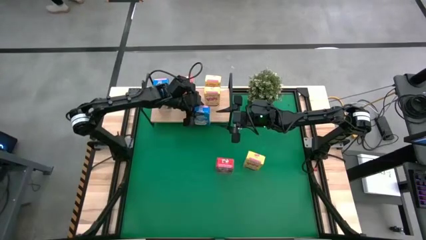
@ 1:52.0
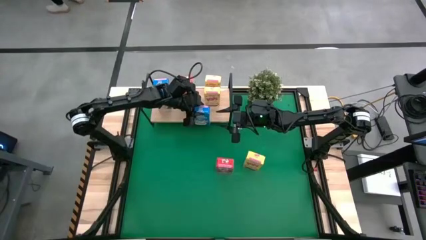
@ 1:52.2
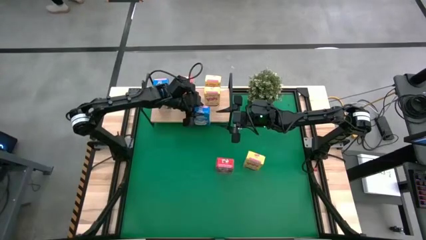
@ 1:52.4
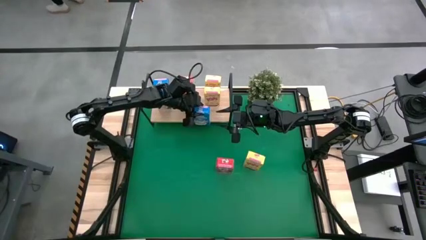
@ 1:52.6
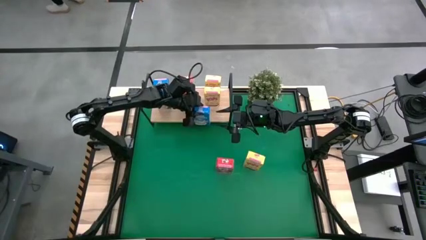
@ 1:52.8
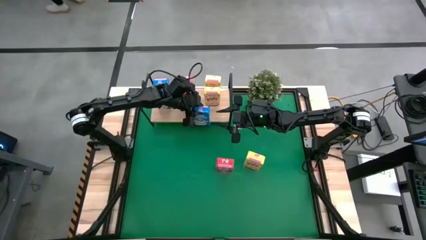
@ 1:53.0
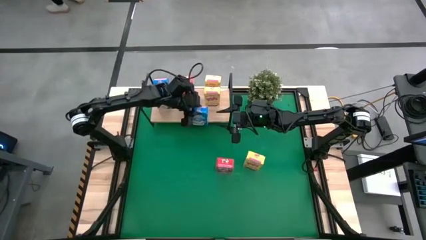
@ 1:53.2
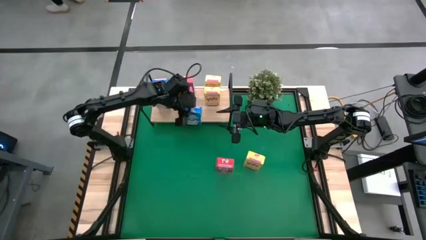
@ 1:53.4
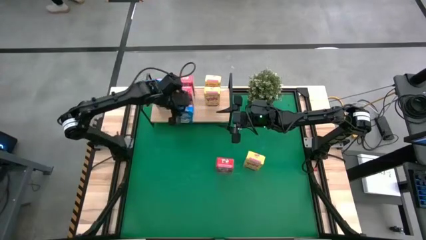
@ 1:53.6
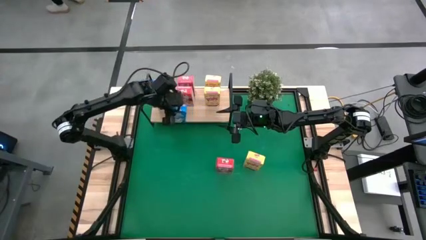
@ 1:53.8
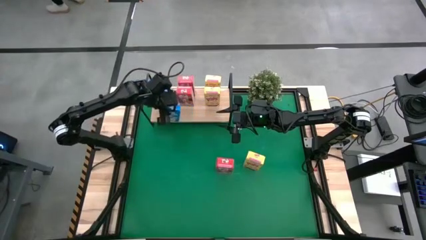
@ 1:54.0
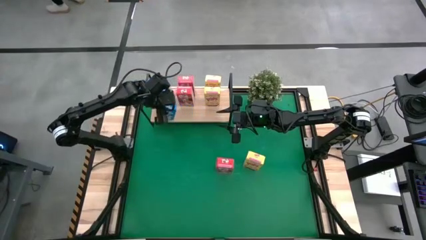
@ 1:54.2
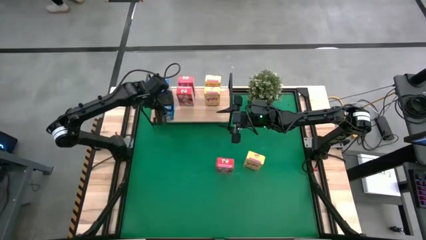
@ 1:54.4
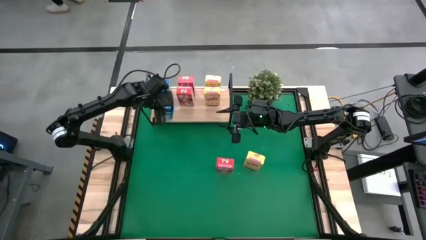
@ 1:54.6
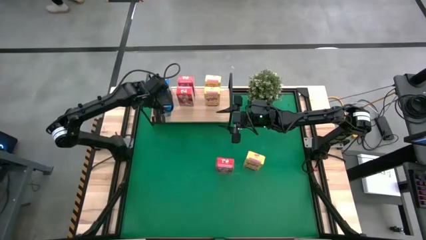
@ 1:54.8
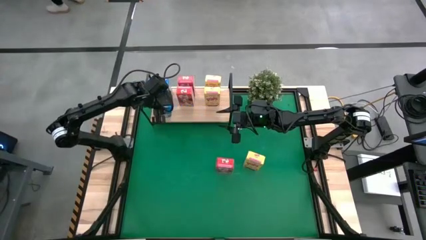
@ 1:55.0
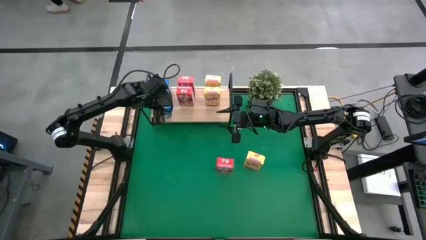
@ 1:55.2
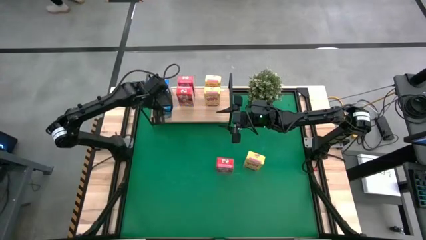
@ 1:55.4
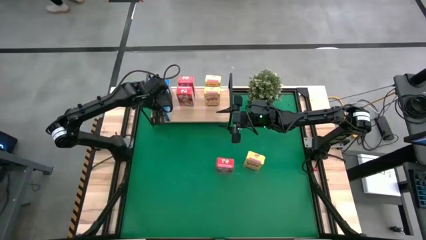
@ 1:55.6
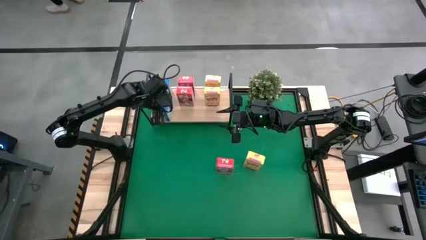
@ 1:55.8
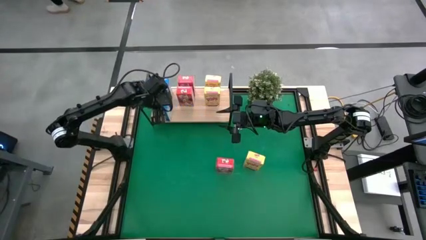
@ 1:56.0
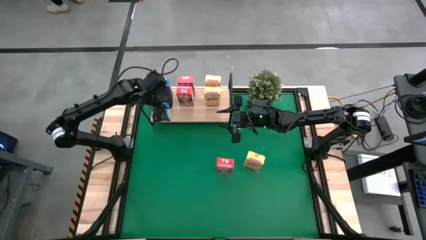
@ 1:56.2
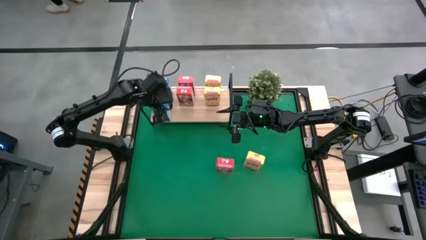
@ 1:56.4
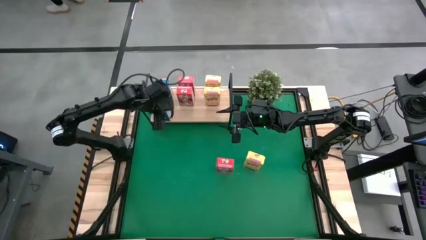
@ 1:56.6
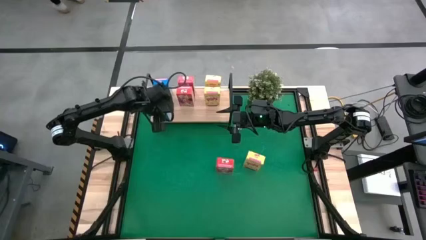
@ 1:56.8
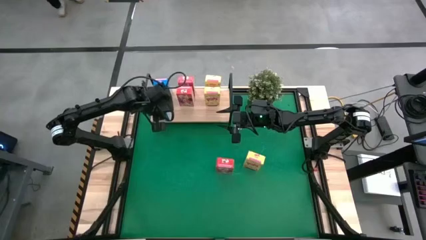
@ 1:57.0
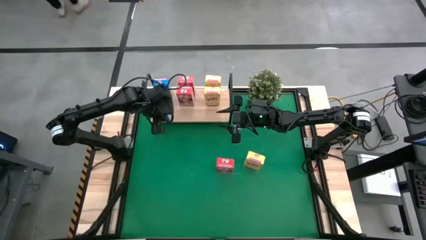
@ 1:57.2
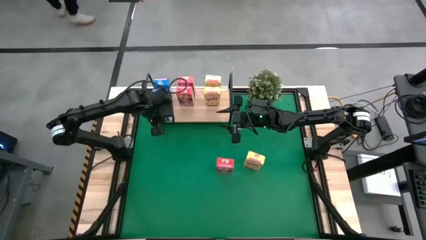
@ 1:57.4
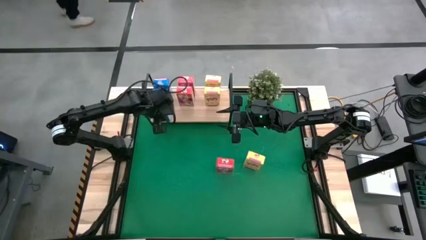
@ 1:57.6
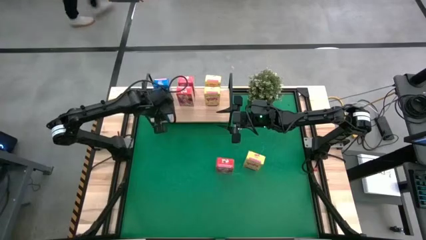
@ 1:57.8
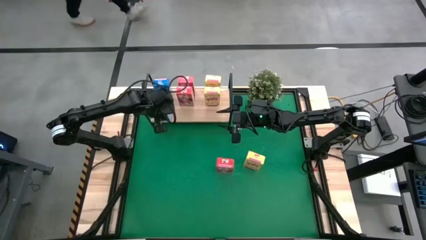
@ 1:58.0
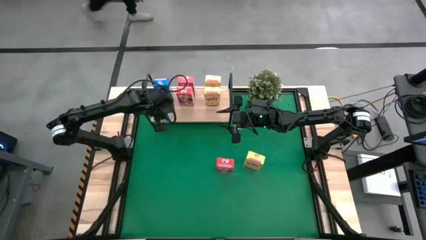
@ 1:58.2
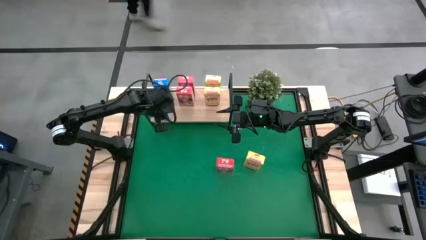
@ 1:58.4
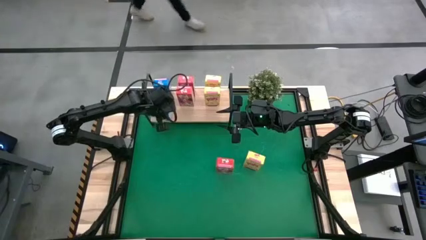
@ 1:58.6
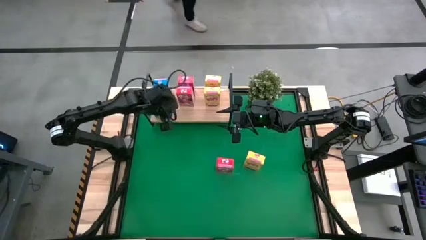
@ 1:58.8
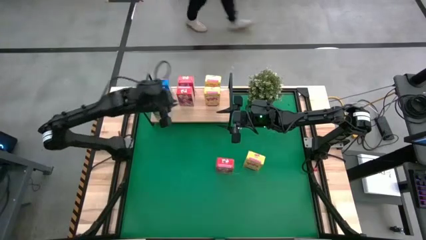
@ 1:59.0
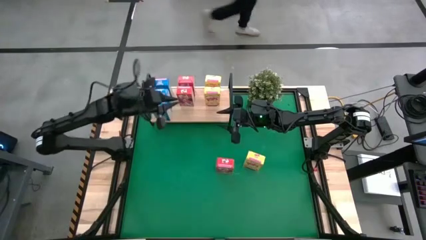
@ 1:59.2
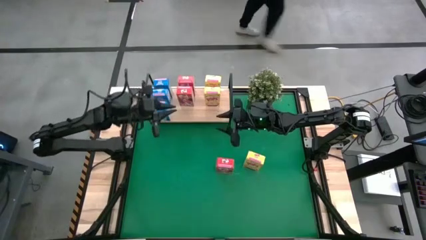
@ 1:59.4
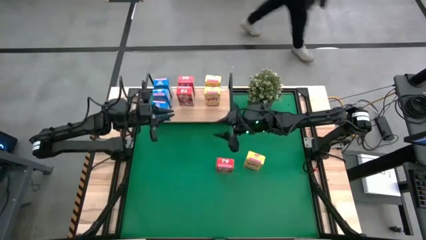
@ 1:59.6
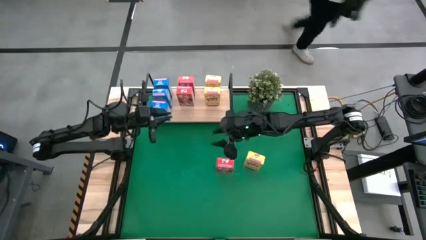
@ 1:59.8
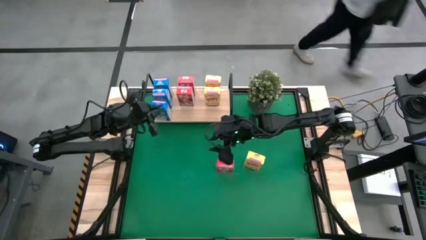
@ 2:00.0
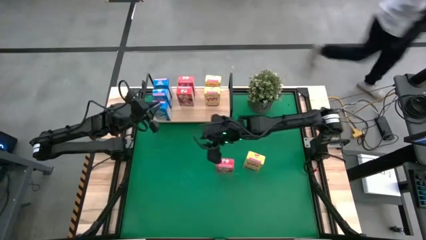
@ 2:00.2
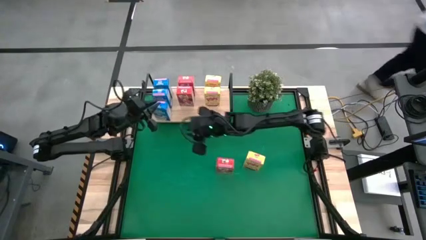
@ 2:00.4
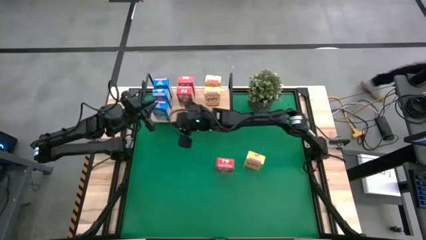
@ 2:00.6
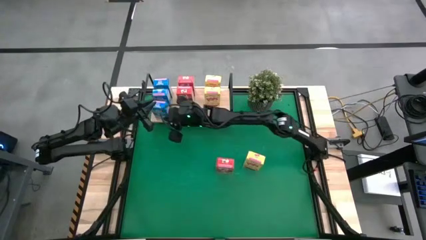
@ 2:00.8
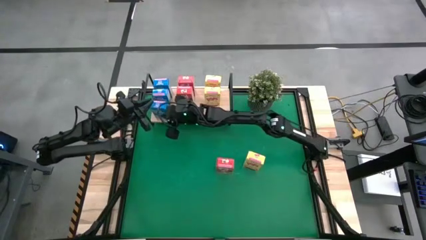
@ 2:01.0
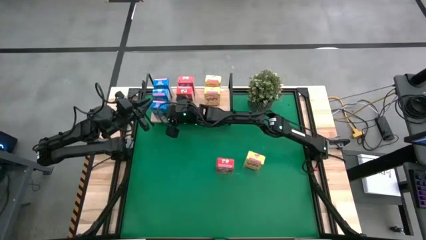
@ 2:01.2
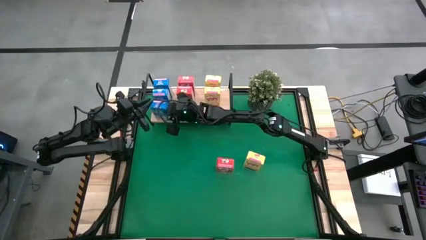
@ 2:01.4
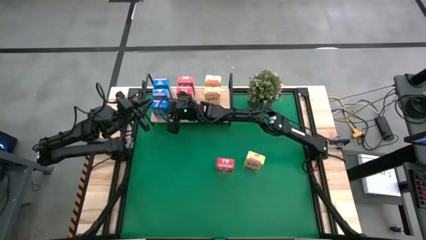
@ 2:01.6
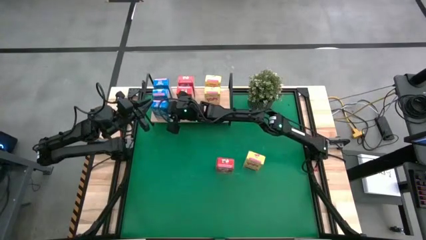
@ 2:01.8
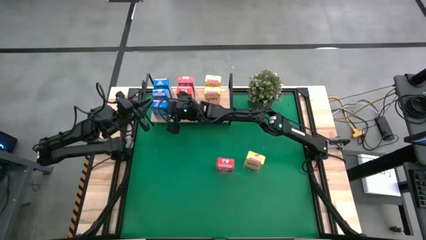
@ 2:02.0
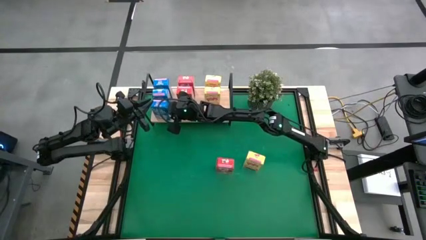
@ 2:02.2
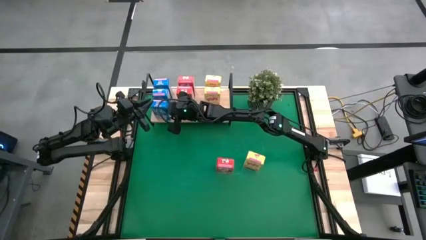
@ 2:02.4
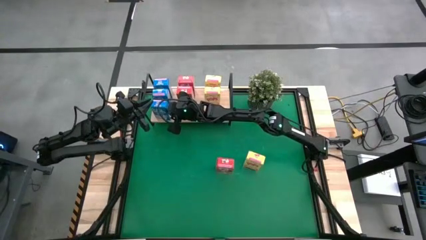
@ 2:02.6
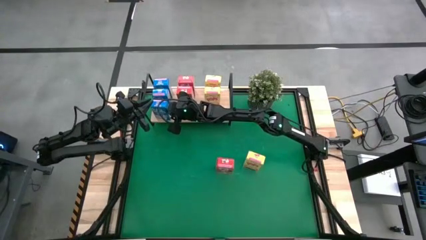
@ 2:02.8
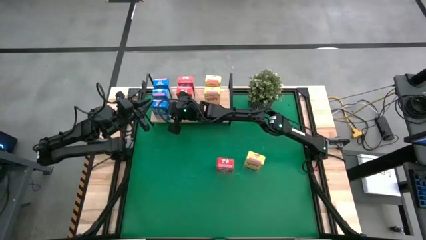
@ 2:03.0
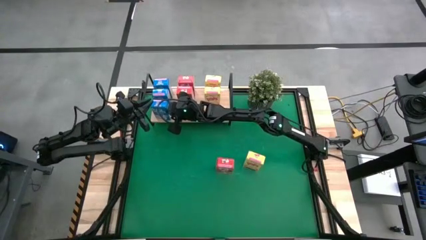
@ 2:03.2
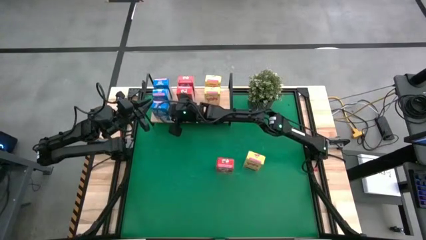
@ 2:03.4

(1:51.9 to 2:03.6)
Task: Stack cereal on shelf
Put the blue cereal box aligned with the other blue cereal boxes on the shelf

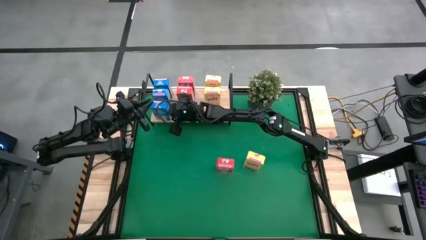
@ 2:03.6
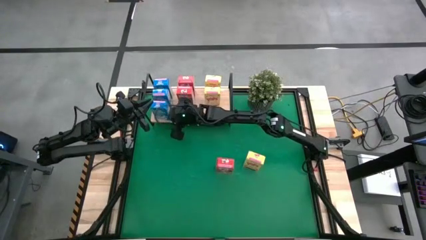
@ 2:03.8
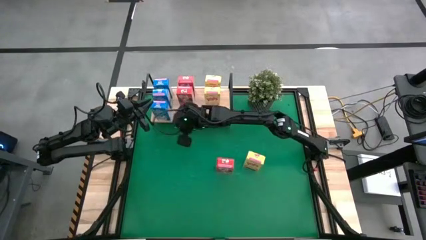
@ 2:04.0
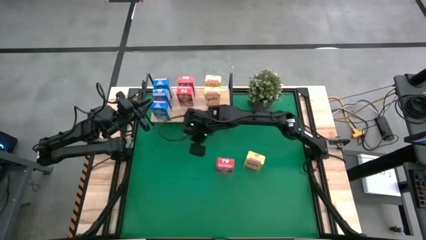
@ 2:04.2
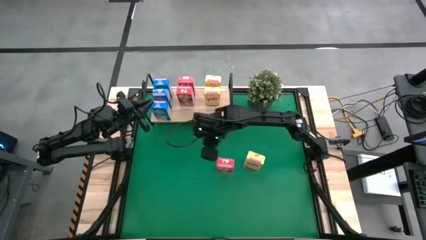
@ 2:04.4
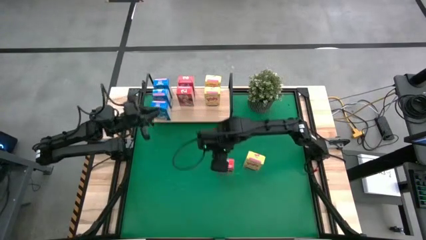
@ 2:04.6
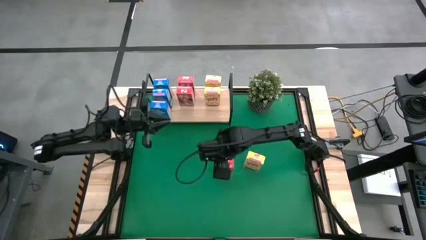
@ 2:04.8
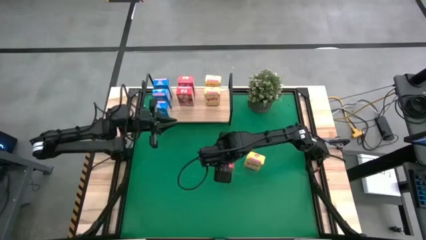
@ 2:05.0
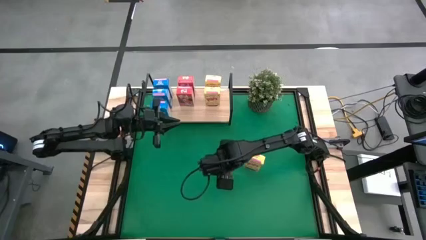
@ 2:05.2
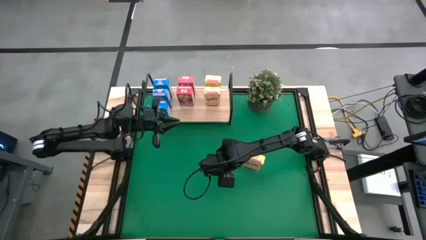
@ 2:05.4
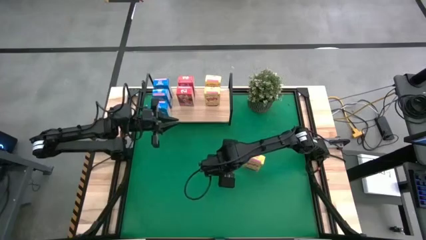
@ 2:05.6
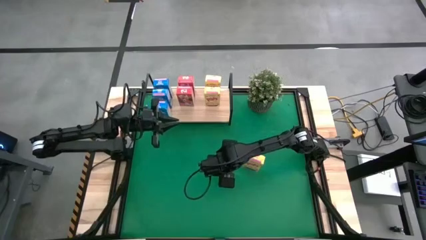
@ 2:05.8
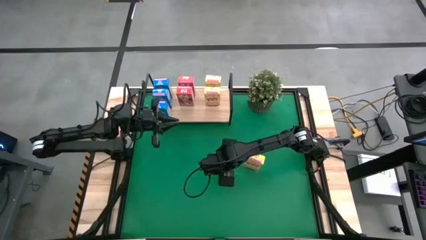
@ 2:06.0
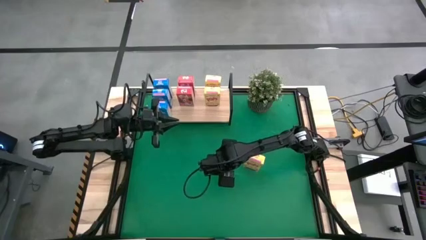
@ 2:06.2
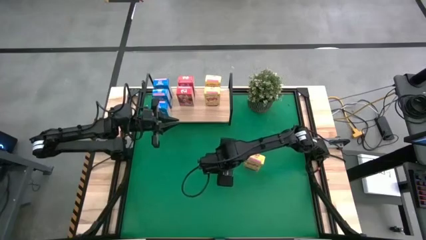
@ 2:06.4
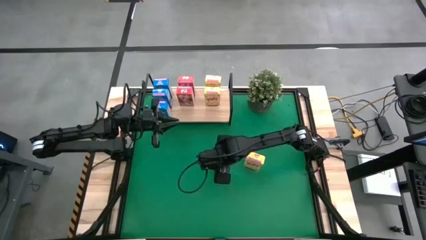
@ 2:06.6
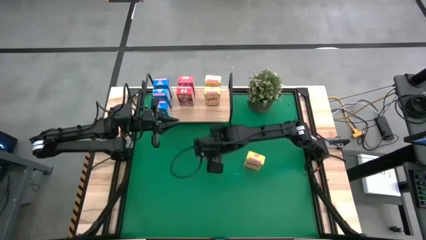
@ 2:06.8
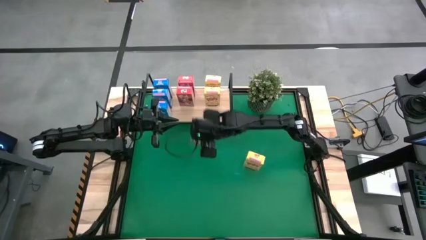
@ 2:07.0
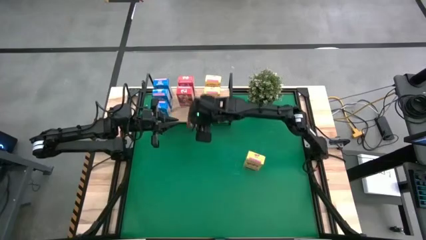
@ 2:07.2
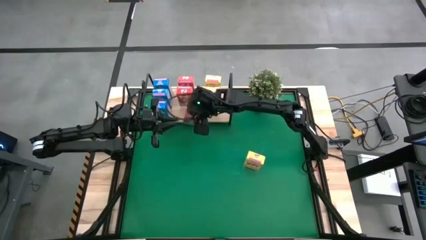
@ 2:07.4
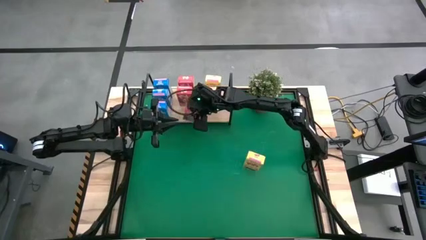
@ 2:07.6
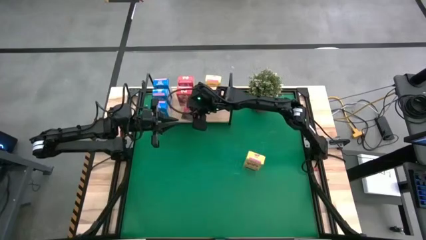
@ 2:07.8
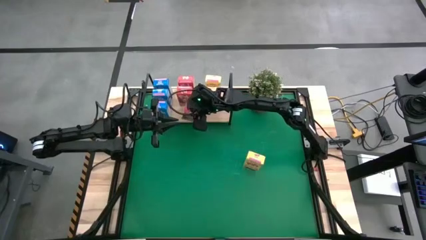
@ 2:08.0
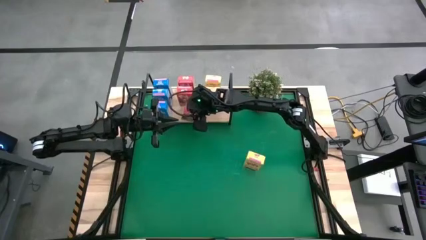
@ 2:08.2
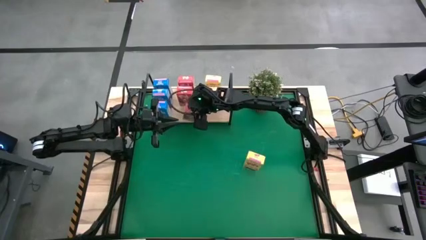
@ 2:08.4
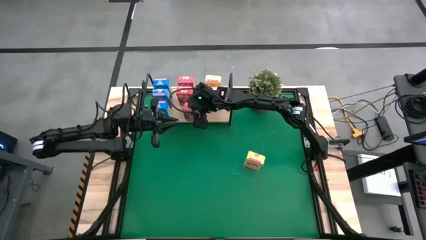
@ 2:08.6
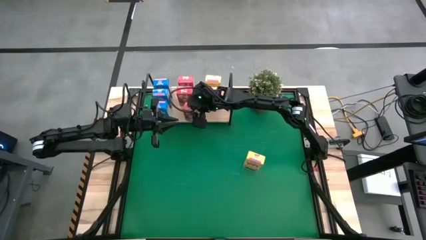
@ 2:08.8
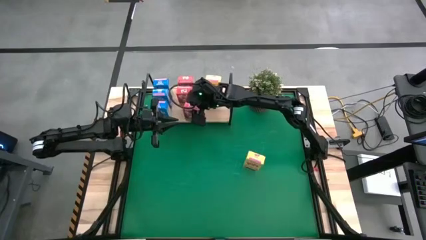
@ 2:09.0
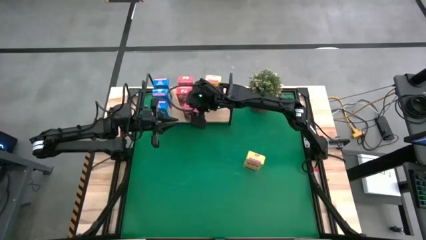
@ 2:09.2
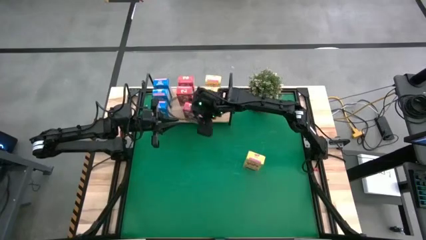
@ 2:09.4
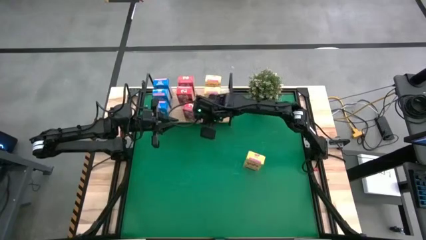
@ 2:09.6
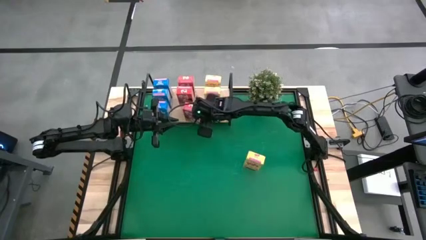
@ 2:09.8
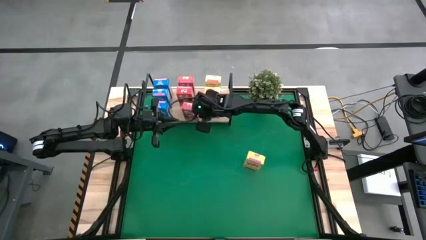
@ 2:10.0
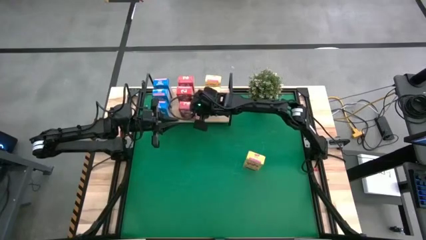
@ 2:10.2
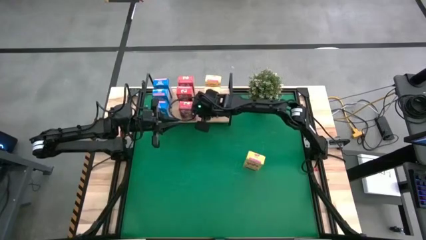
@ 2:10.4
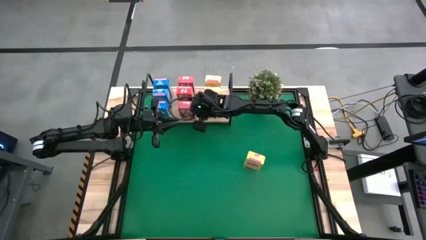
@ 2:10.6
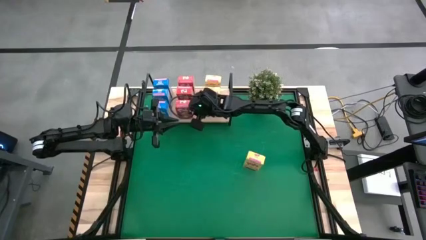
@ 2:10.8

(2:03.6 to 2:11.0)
Put the red cereal box aligned with the other red cereal boxes on the shelf
